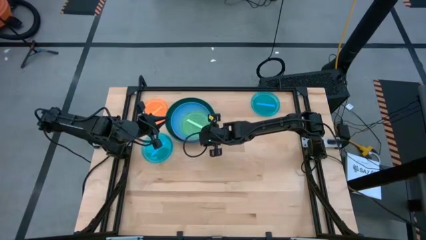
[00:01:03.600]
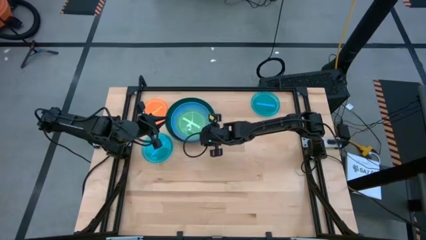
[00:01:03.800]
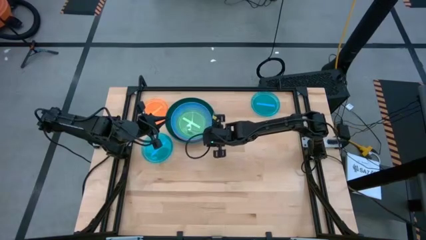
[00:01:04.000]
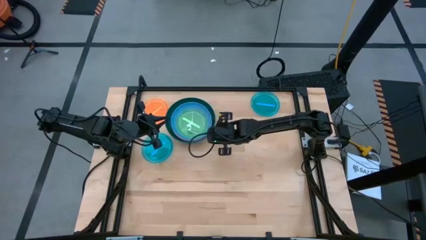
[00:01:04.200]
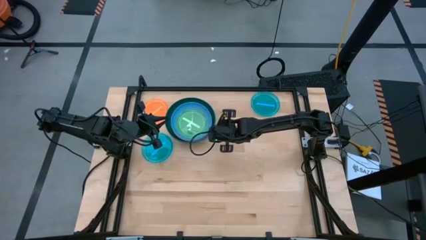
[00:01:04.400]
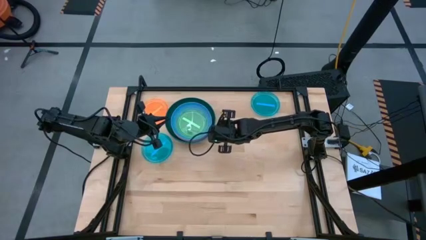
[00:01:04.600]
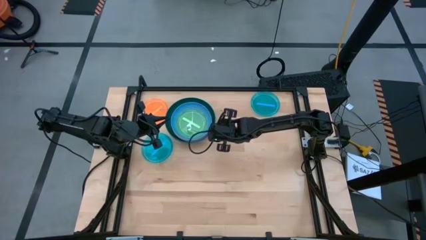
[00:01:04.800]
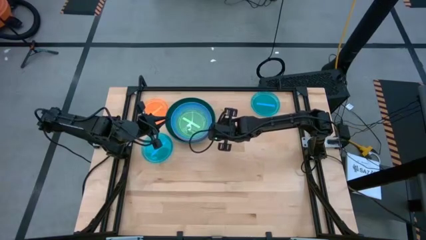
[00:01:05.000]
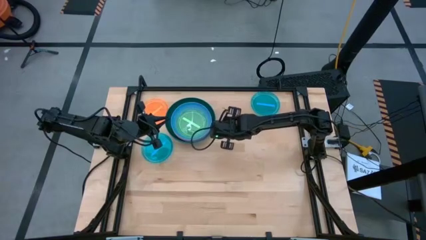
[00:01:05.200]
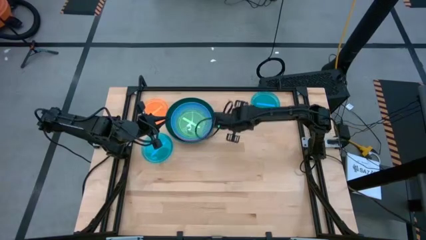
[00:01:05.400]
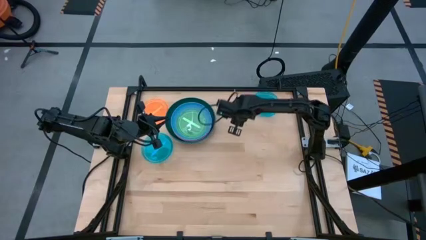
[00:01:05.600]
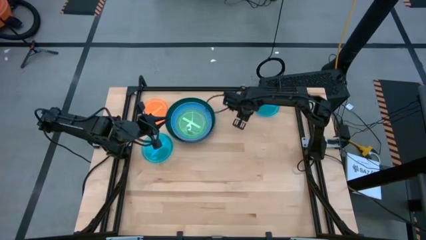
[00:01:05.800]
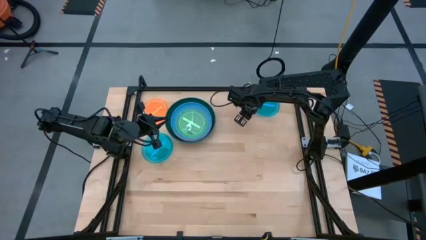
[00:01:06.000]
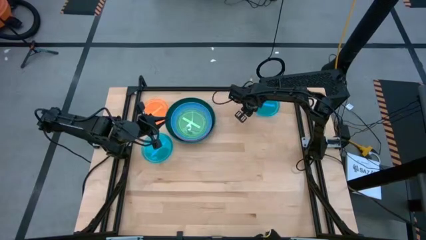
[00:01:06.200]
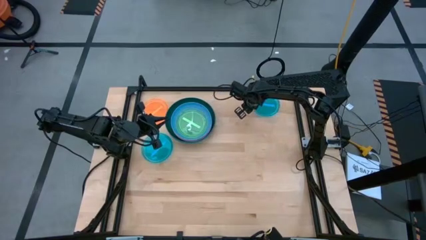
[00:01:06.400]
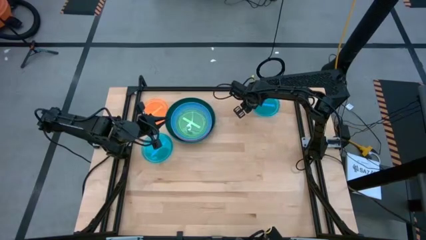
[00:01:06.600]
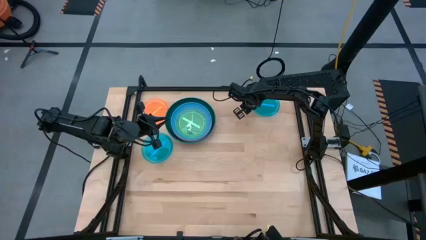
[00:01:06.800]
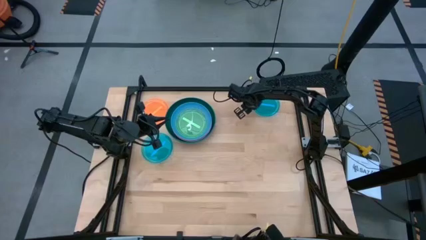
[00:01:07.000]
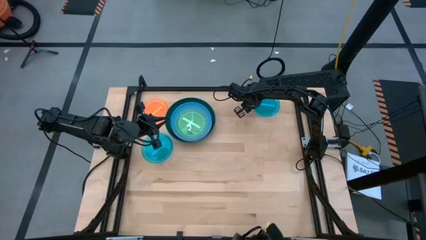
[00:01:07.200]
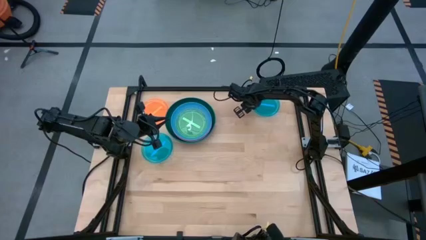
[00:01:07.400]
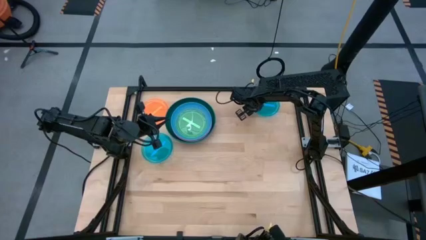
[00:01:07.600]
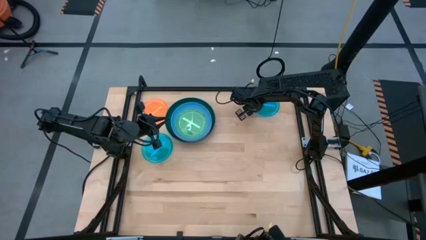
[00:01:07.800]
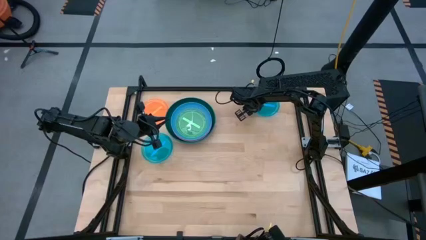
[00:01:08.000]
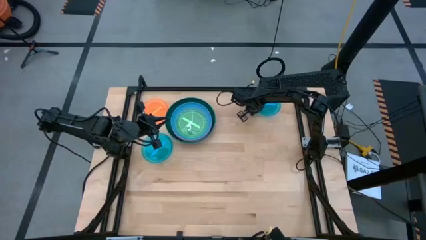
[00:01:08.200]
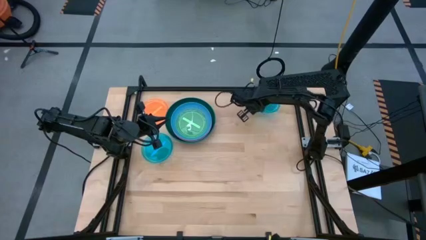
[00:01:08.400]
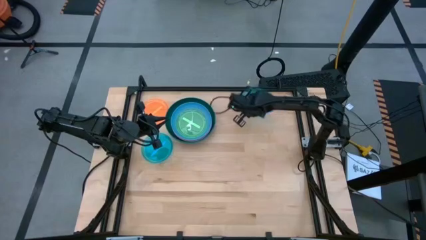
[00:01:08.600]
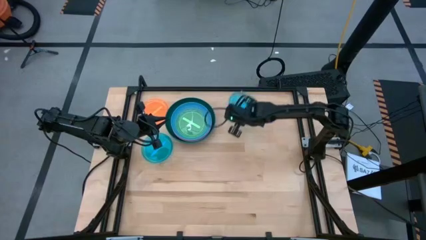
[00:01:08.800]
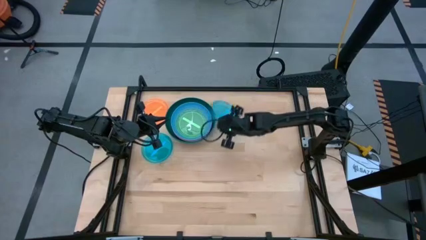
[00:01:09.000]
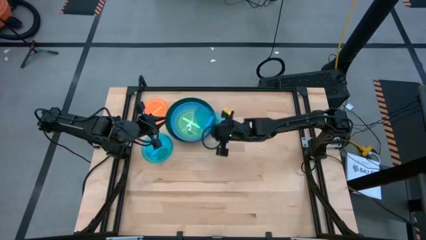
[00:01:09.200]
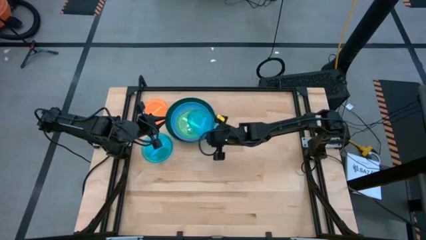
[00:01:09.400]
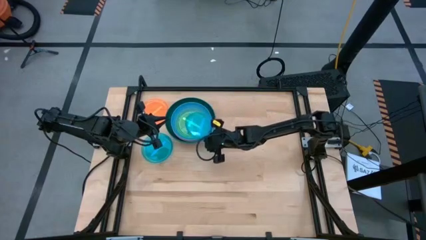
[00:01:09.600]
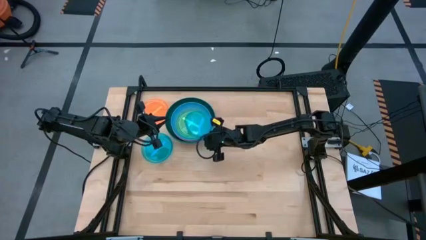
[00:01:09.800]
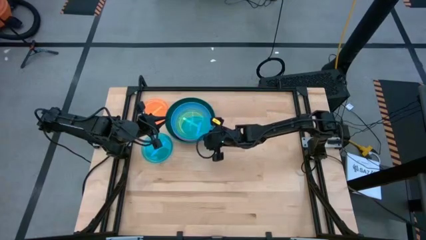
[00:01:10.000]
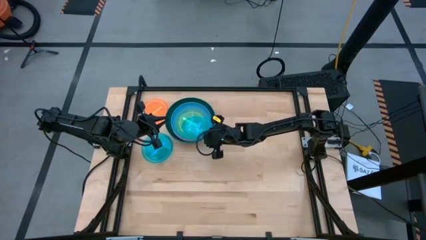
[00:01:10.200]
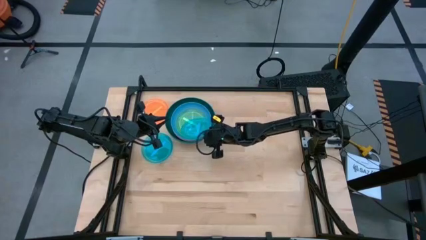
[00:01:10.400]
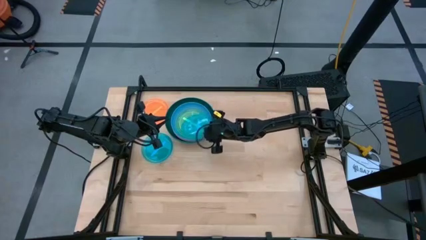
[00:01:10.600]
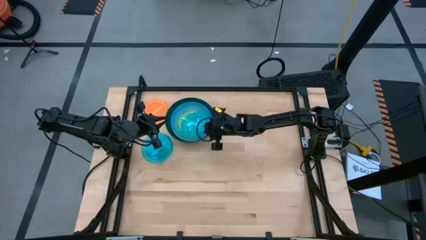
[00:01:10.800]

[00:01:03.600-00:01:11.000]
Task: Stack plastic plates
Stack the top small blue plate on top of the small green plate

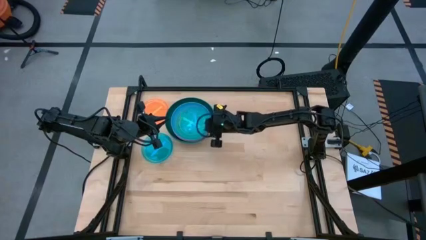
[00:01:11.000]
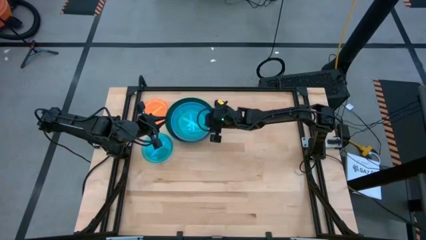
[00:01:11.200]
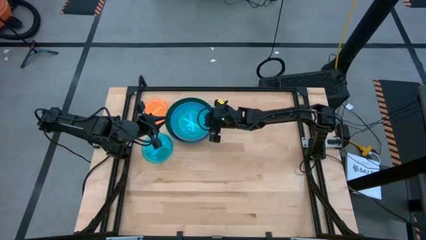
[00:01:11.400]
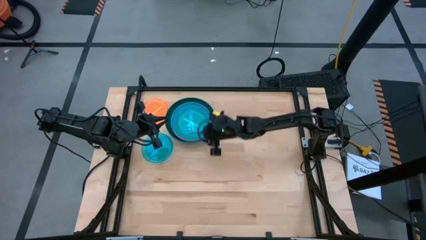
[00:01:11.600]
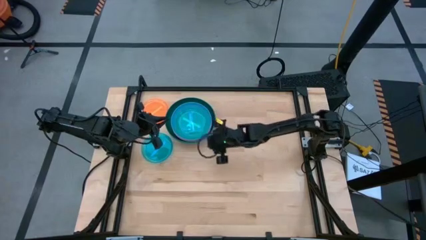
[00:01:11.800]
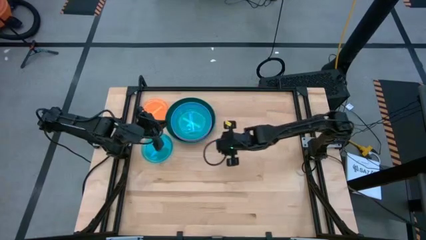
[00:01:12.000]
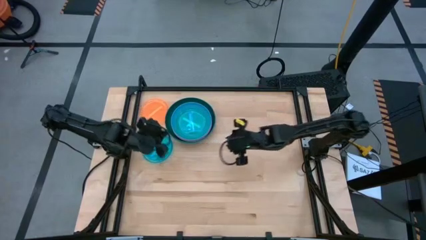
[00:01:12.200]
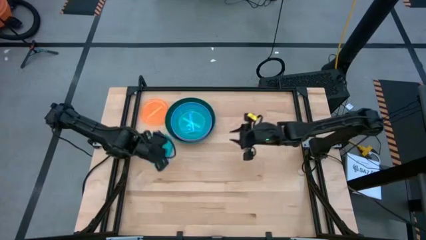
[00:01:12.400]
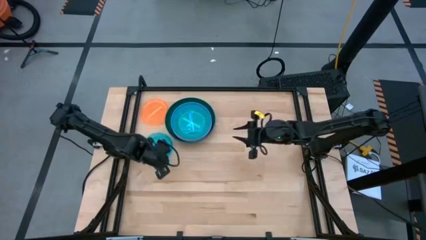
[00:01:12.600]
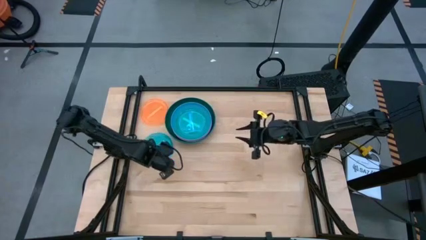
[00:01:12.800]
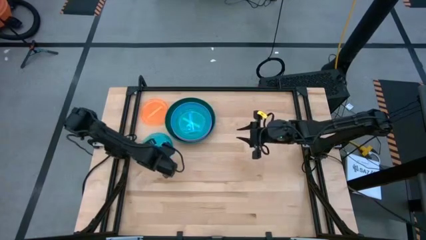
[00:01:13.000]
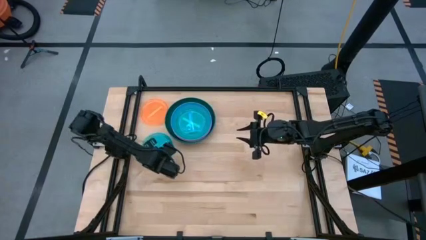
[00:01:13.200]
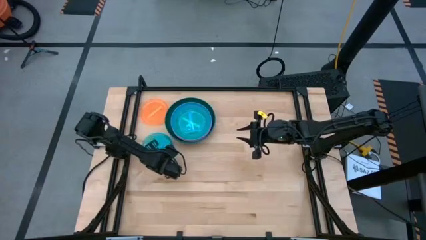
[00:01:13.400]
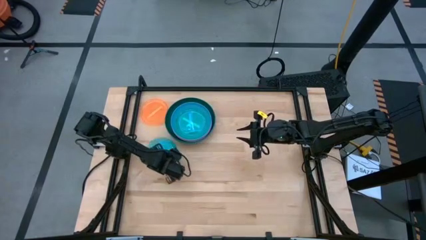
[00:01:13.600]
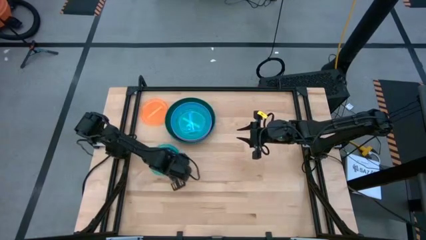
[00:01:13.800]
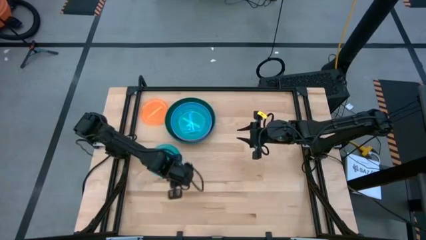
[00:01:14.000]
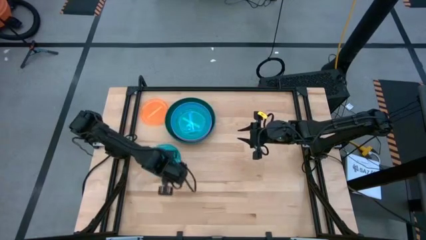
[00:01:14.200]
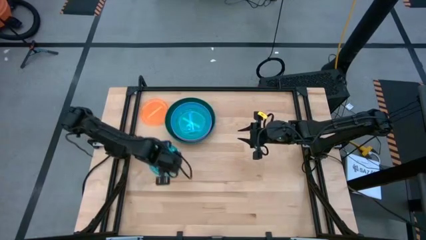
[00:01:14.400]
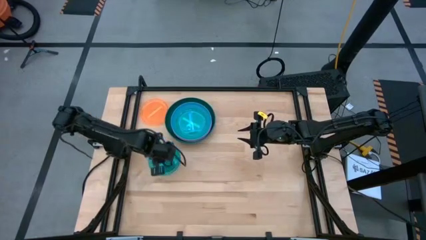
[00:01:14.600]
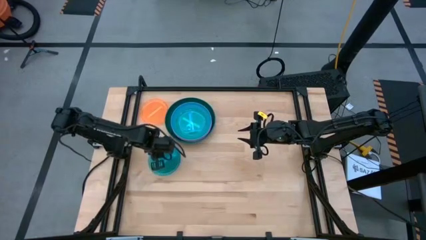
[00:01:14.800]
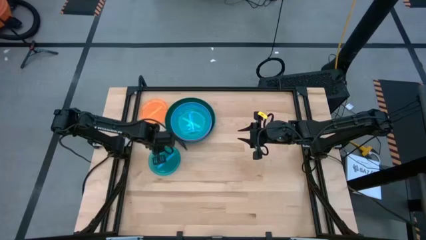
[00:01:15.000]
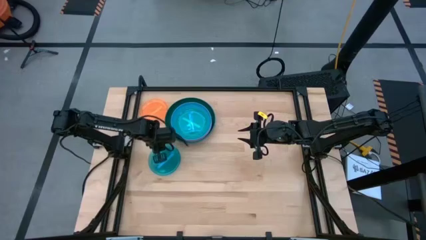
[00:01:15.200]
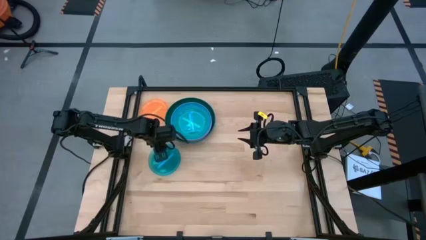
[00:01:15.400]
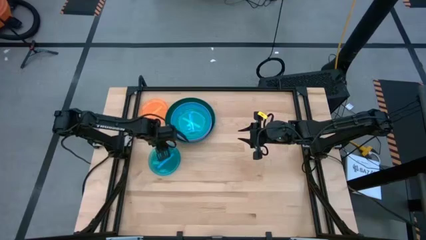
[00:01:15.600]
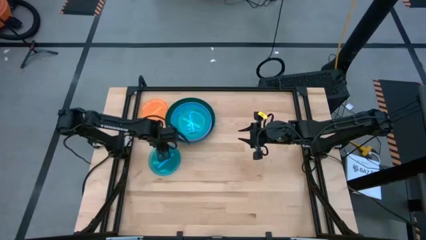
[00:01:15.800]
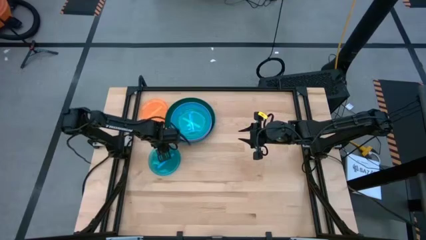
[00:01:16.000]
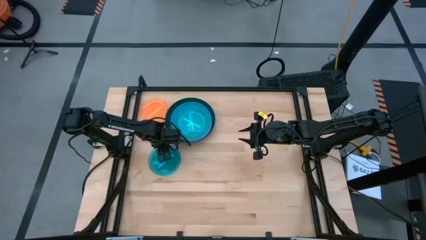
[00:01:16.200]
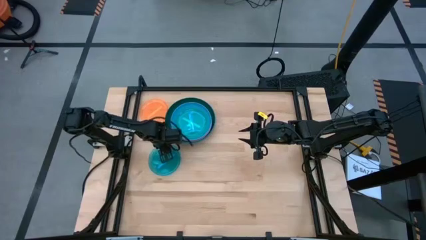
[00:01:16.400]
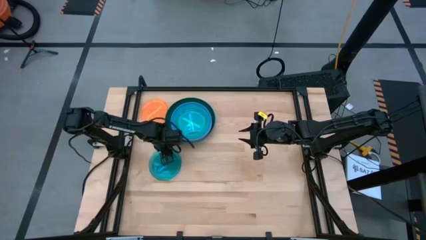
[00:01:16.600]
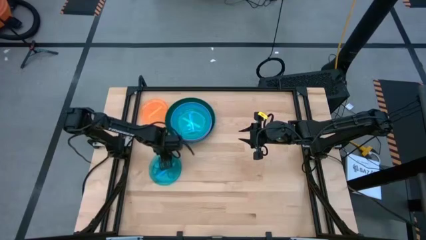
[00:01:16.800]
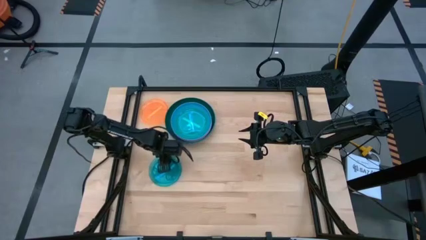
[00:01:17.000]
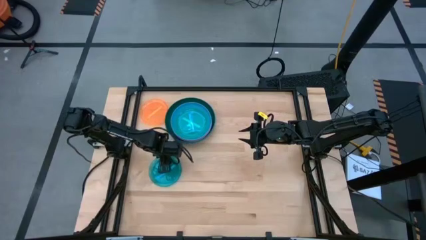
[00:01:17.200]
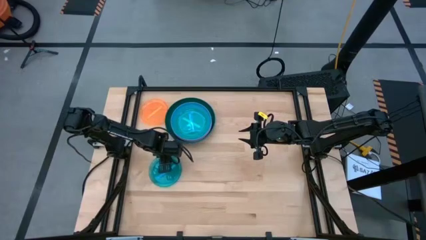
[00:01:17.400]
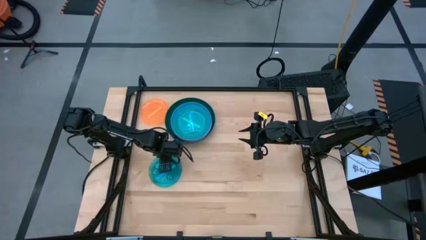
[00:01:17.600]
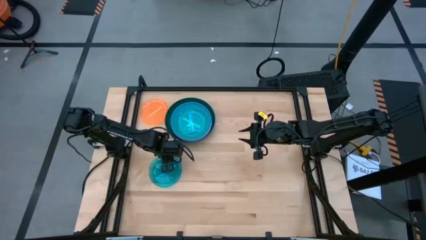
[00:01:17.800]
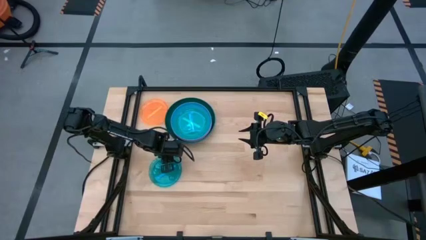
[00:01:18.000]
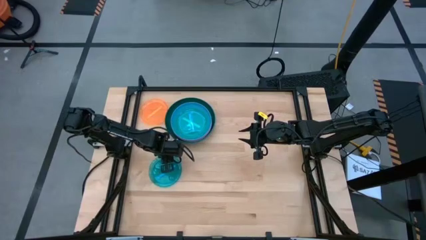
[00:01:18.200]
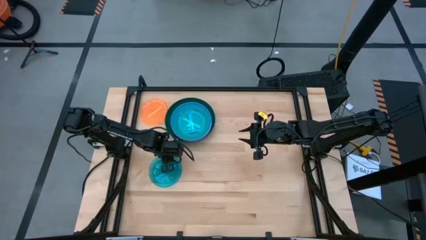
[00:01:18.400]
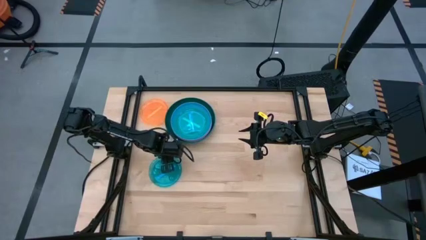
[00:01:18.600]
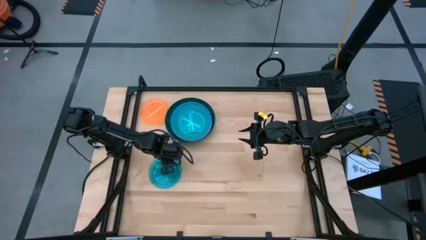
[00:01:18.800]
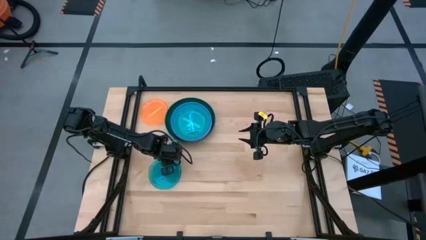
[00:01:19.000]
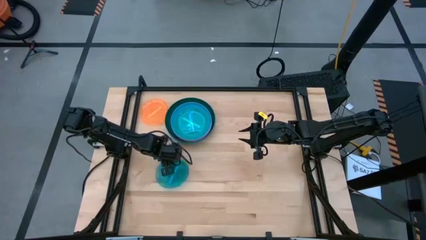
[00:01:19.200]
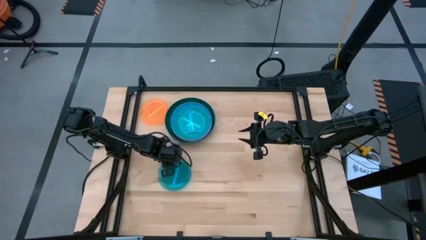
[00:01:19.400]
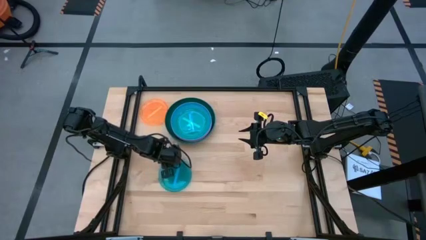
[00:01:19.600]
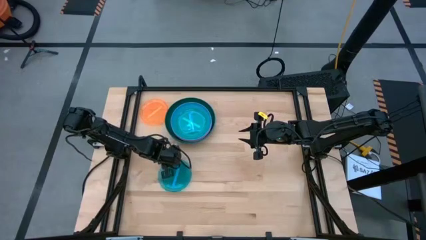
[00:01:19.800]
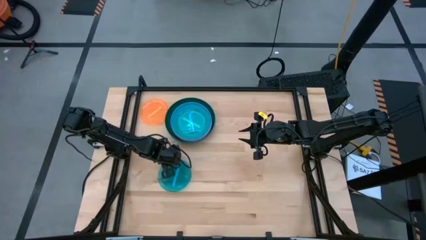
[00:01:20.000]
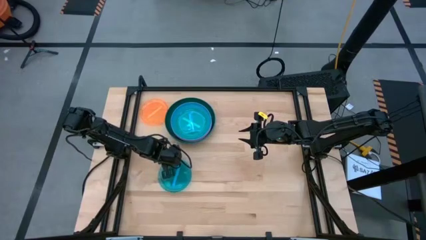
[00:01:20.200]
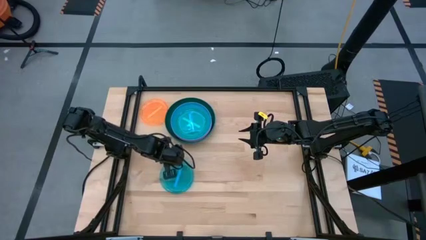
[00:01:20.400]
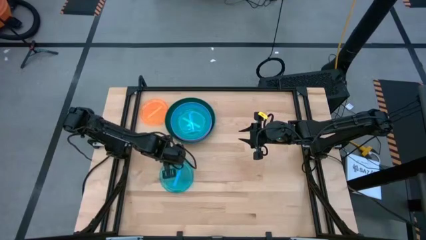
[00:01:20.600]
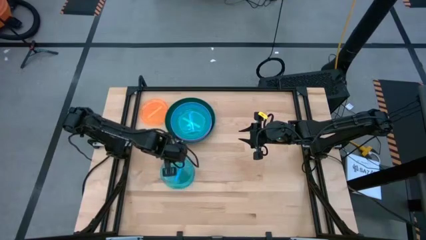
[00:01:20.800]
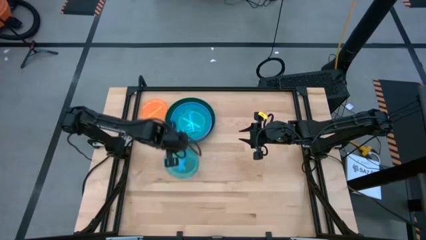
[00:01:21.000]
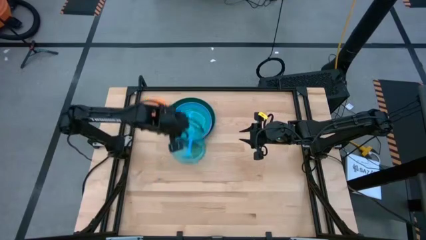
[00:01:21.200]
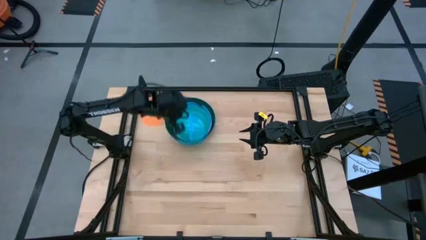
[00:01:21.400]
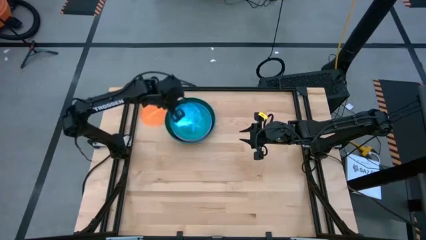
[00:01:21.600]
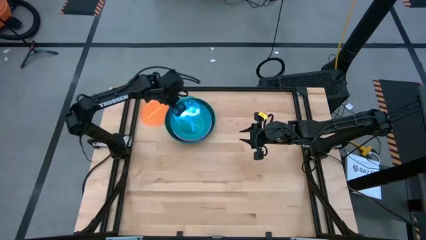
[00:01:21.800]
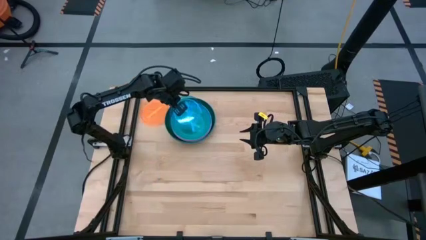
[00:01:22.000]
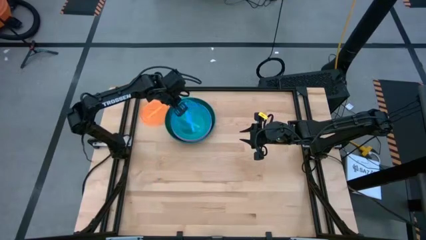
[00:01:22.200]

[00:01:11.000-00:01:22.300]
Stack the small blue plate on top of the top small blue plate
